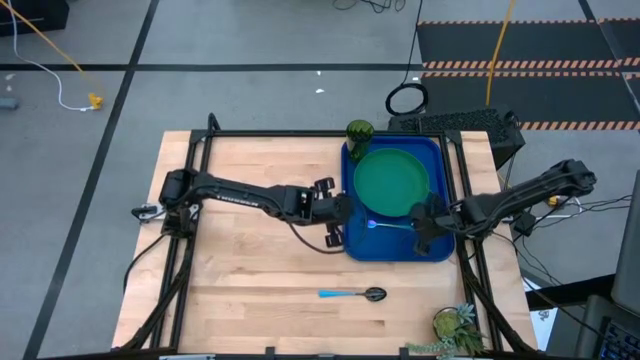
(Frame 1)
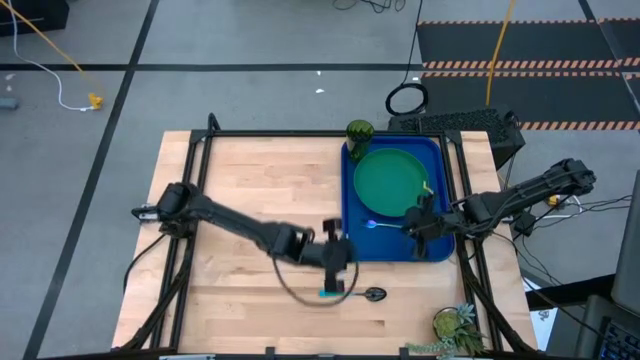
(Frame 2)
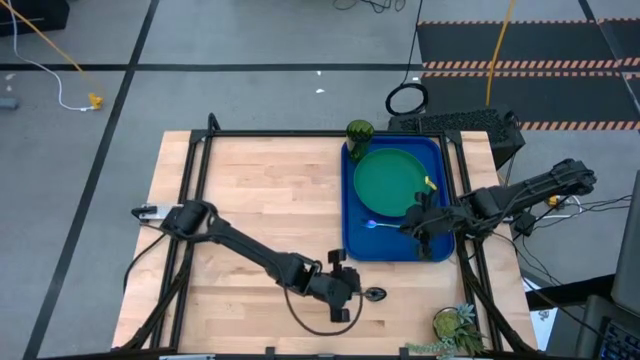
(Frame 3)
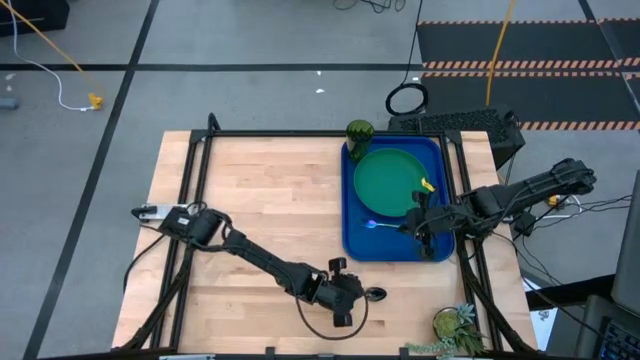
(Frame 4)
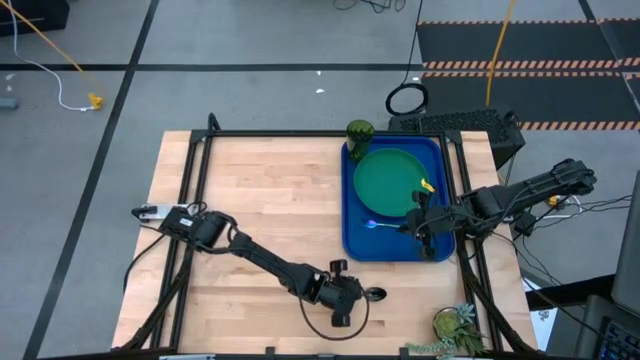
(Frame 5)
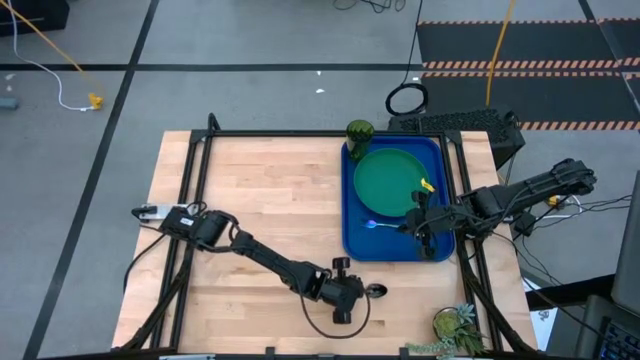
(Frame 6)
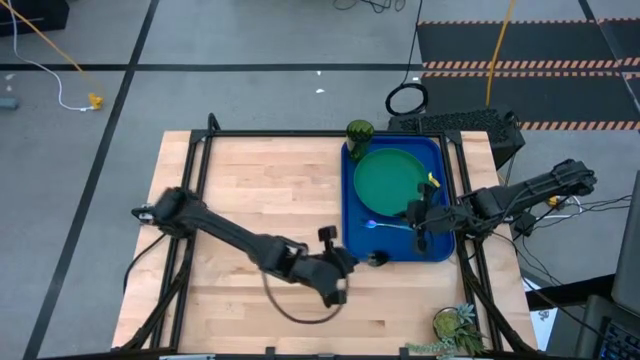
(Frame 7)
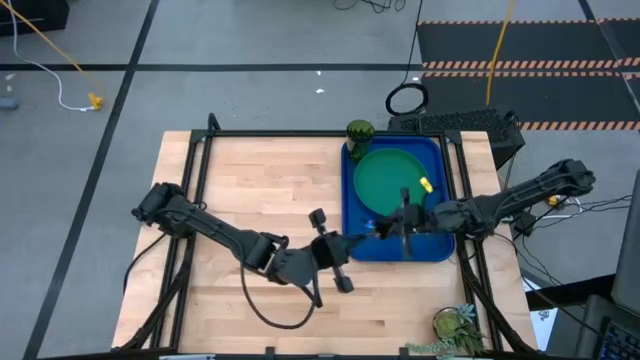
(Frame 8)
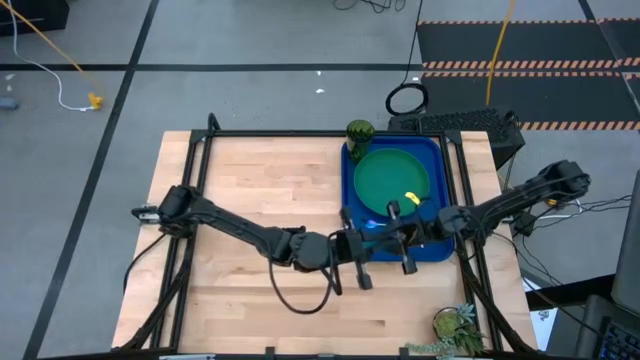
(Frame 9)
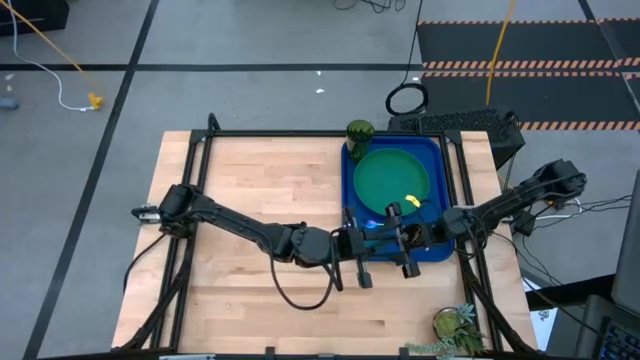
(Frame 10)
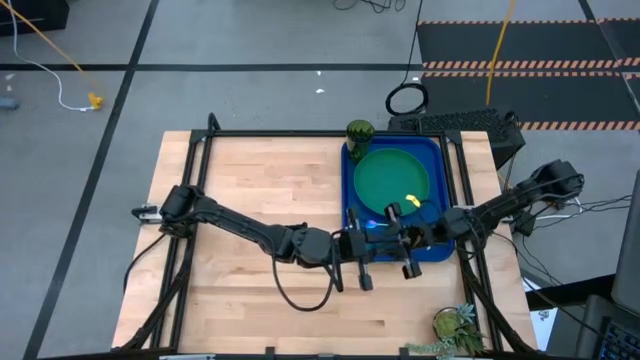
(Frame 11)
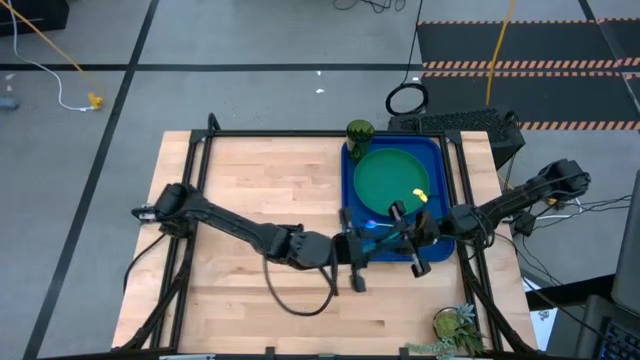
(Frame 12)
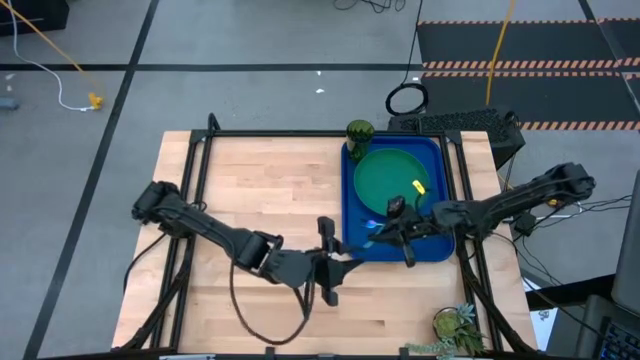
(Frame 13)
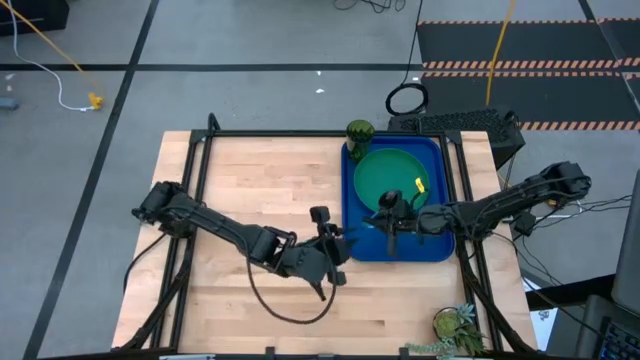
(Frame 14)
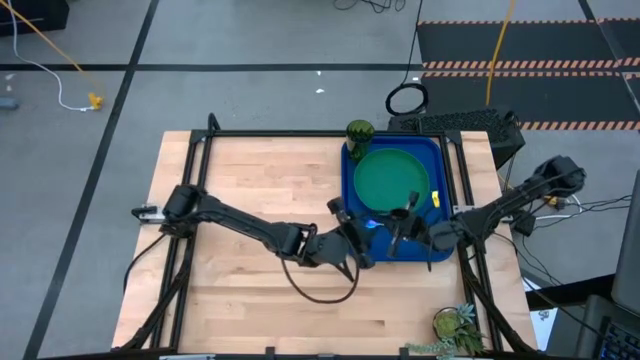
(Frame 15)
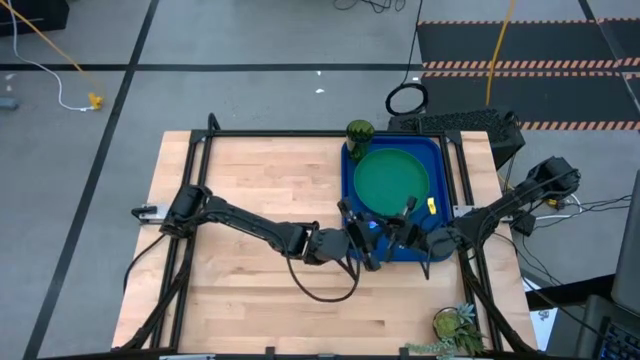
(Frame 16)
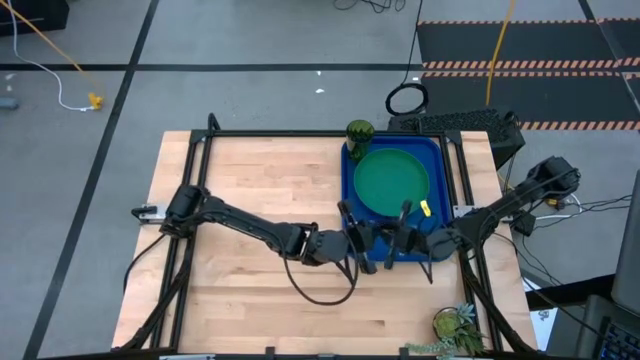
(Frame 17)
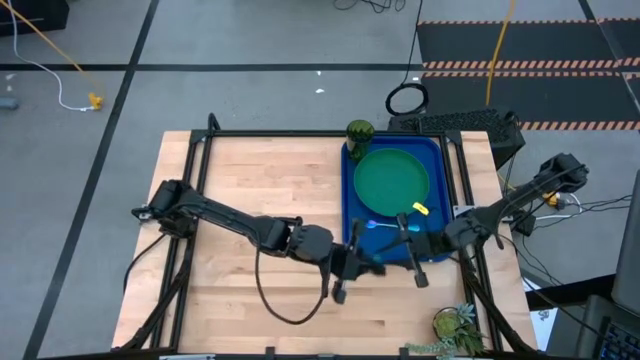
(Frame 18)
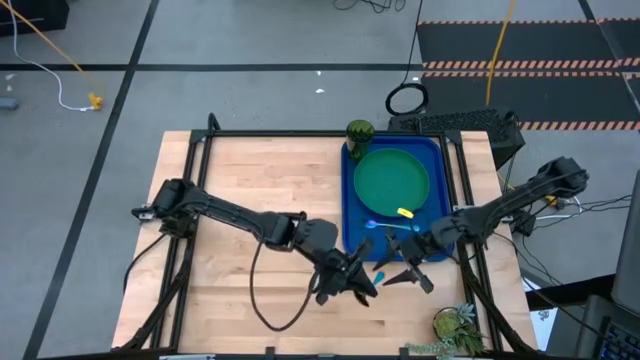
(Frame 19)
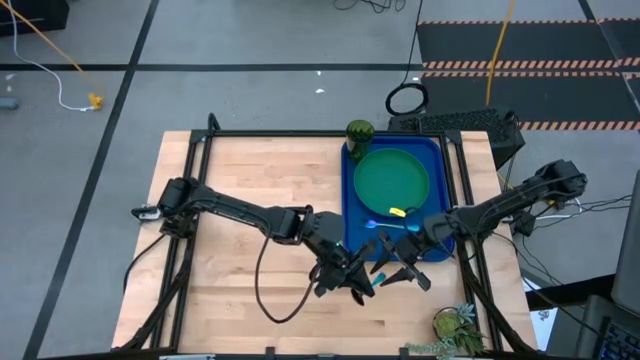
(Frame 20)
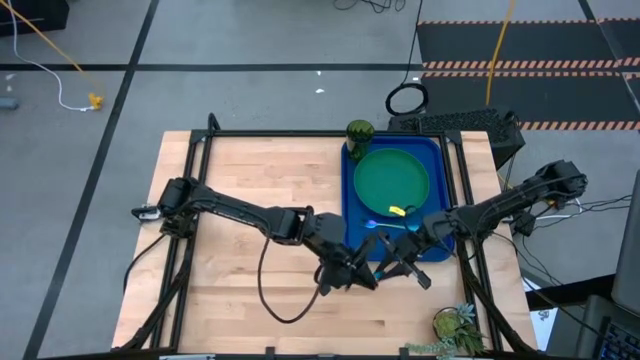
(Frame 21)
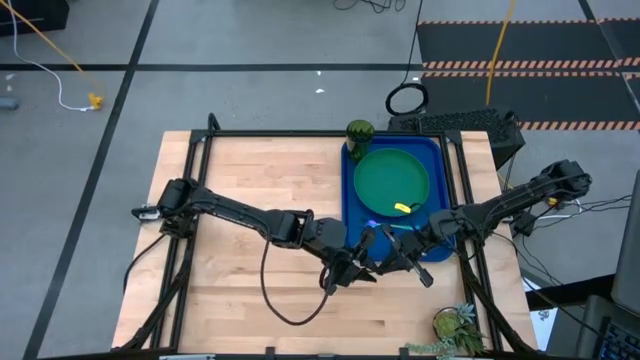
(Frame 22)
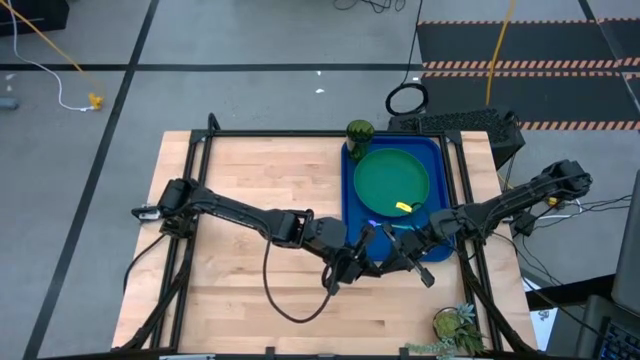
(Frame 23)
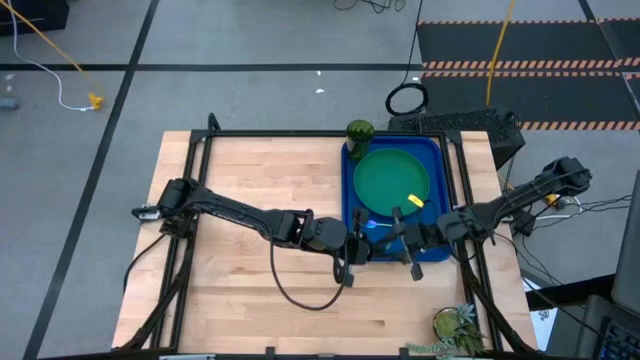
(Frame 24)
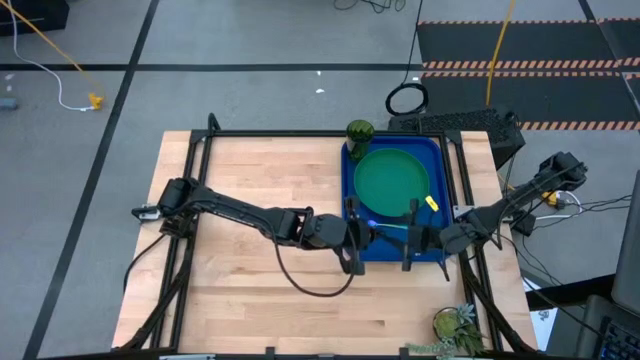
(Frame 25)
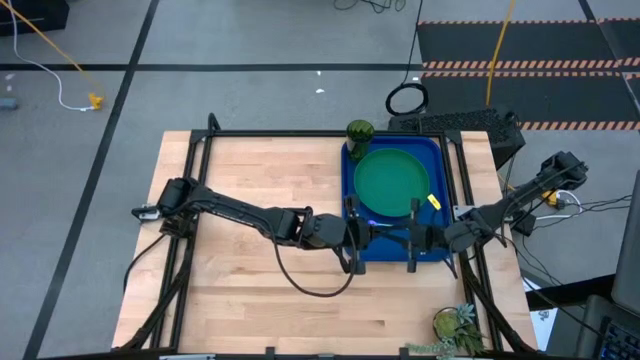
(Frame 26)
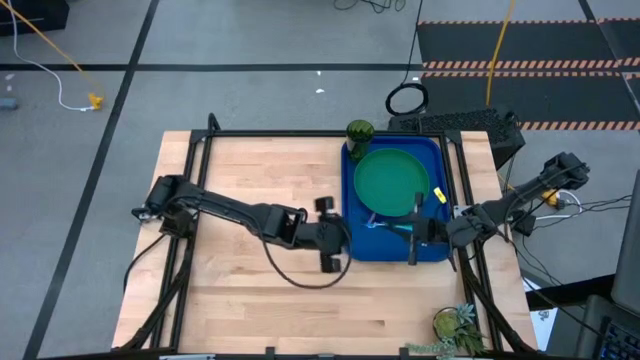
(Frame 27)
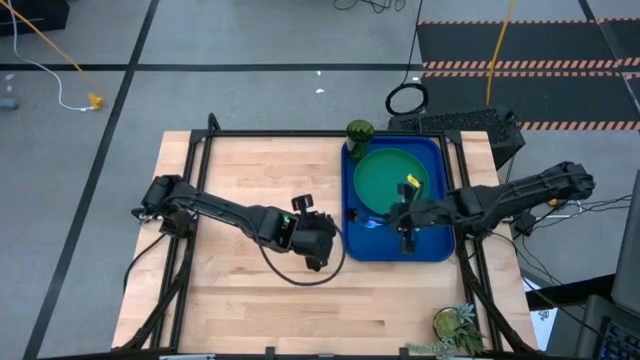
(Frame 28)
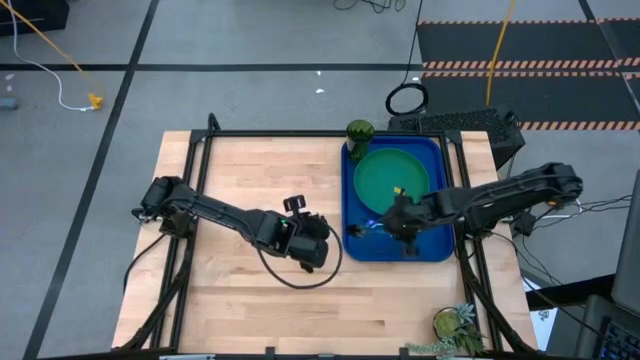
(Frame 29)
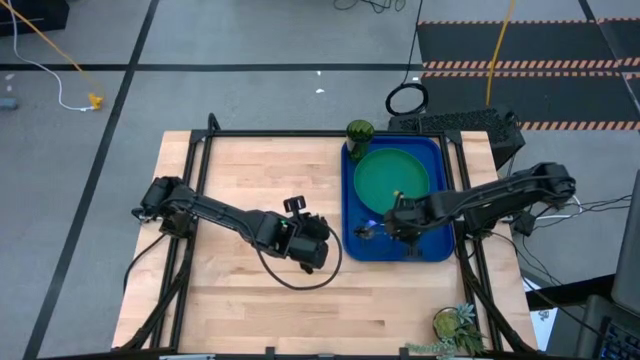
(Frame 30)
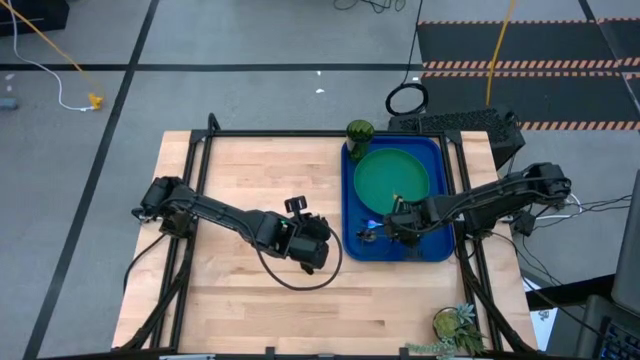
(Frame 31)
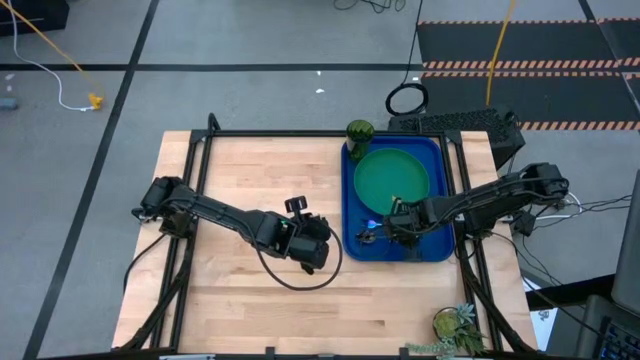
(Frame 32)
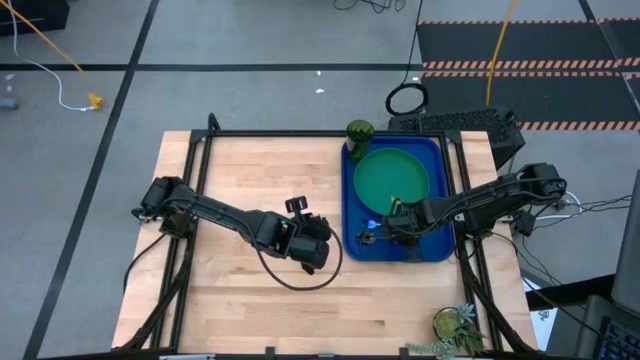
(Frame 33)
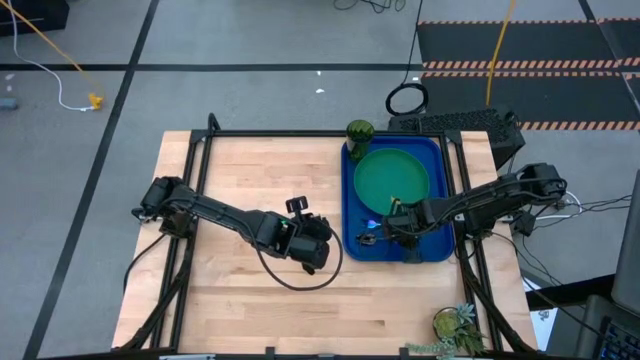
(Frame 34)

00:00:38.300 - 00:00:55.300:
Task: Pick and place plate/cup/fork/spoon on tray
Put the blue spoon on the blue tray to the left of the blue fork

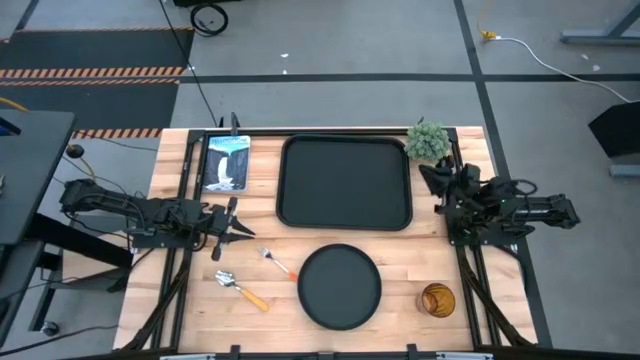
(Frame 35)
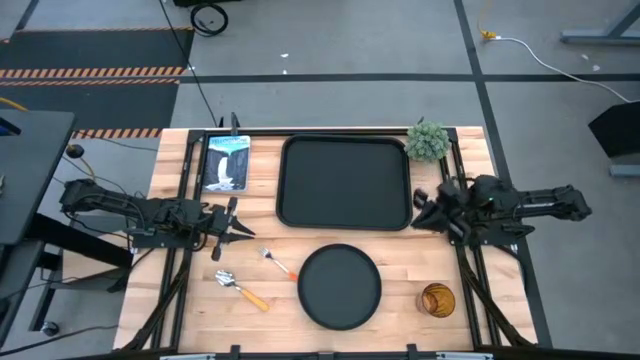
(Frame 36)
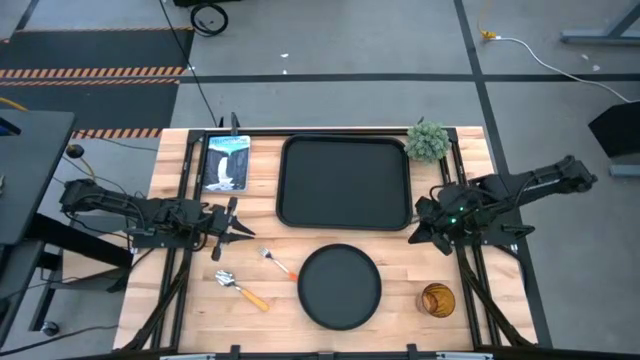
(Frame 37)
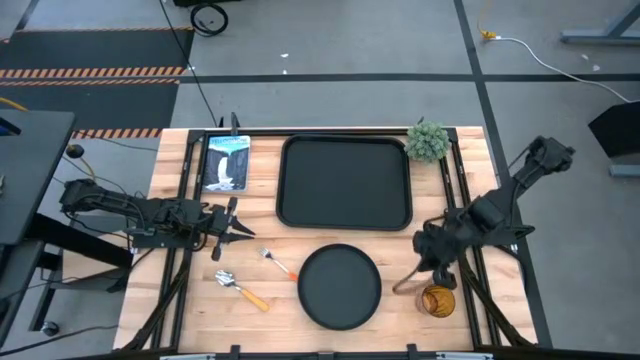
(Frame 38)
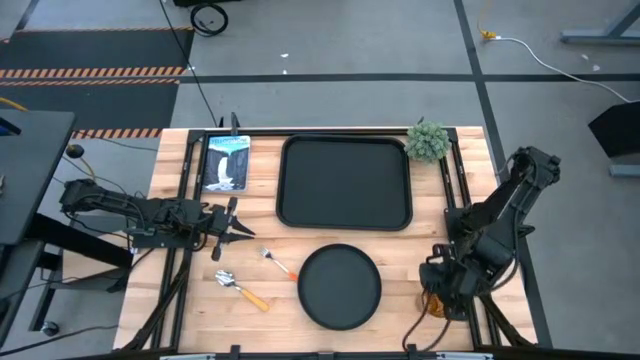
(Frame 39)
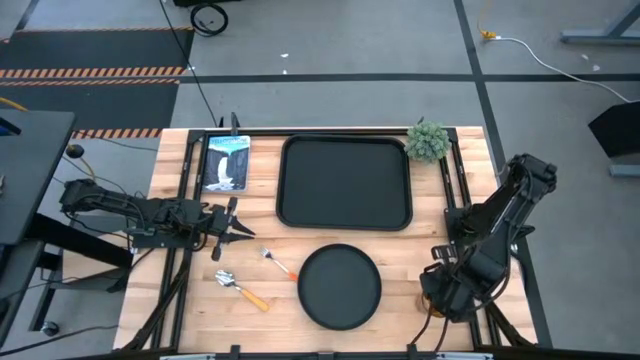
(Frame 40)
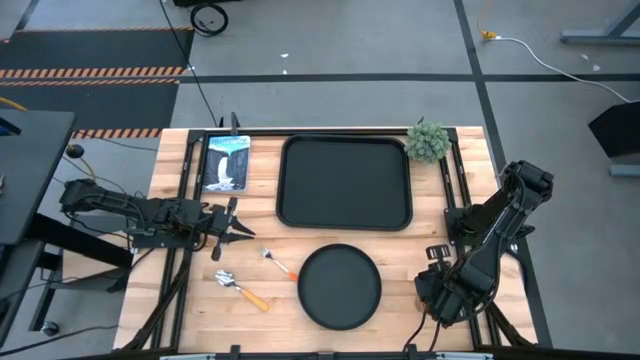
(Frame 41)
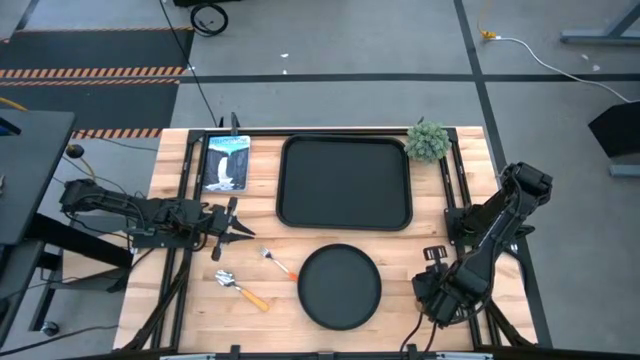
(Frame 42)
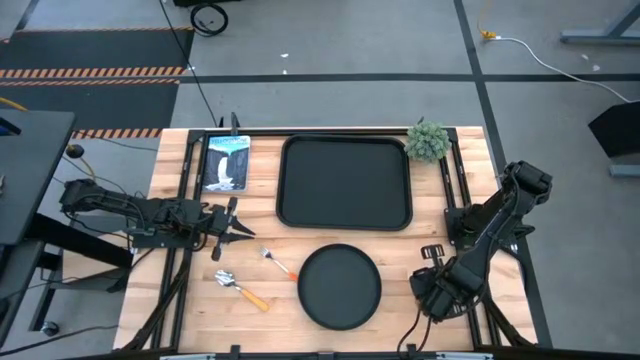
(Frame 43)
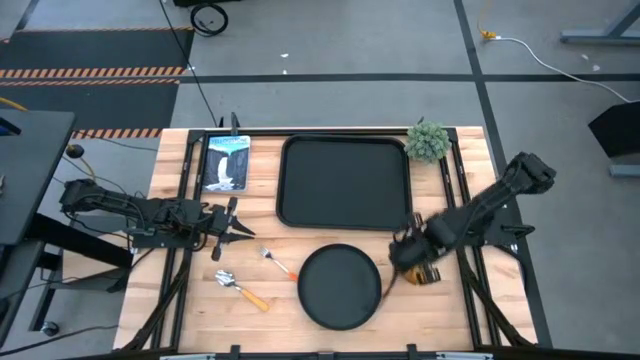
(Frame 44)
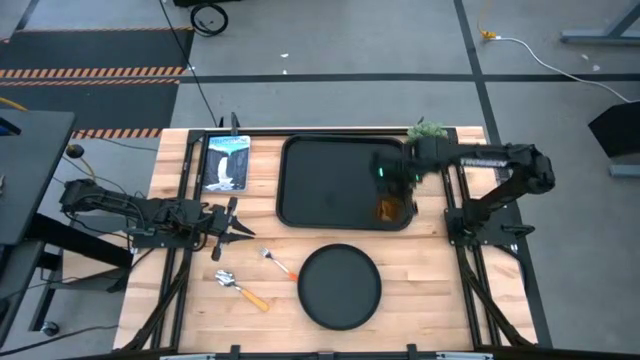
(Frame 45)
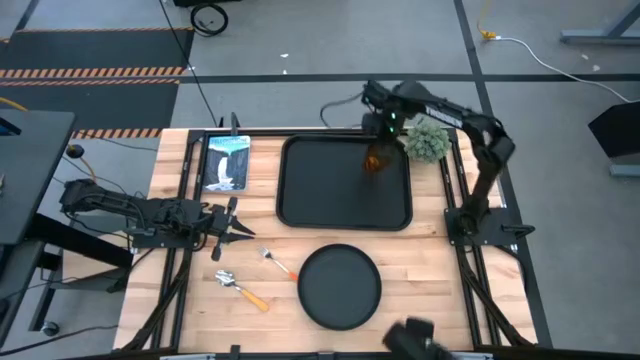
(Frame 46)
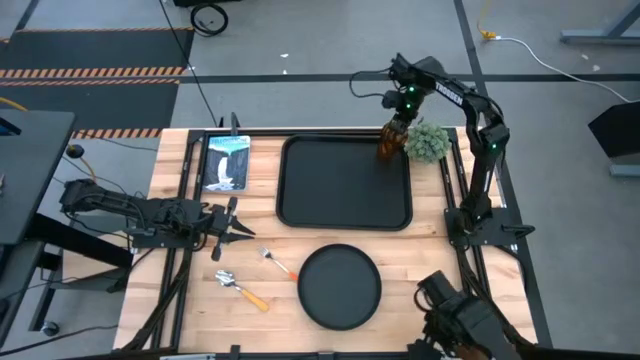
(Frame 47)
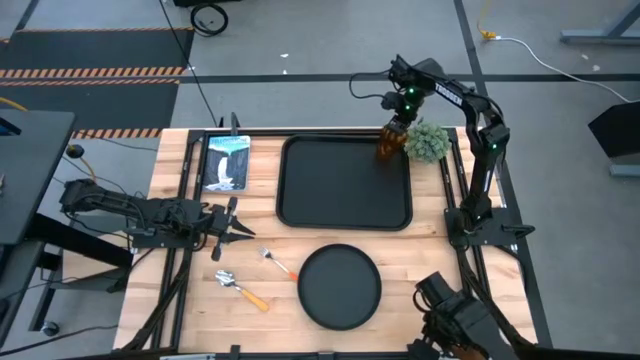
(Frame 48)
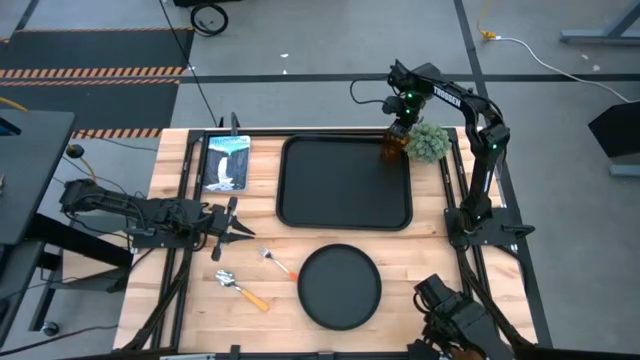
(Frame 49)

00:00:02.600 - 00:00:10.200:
Task: Pick and place plate/cup/fork/spoon on tray
Put the yellow cup on the top left of the black serving tray
